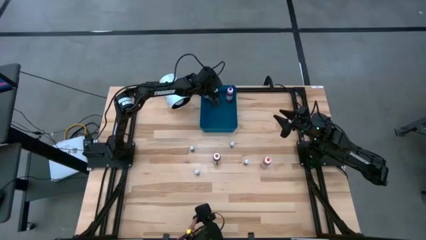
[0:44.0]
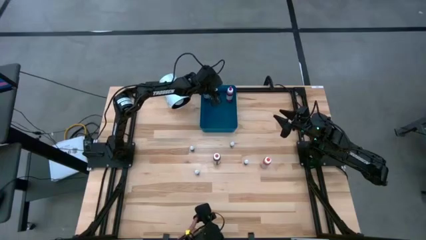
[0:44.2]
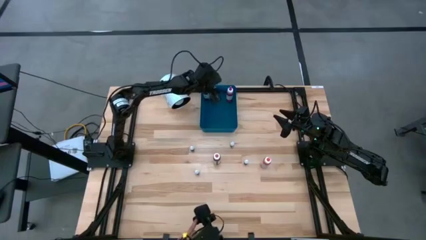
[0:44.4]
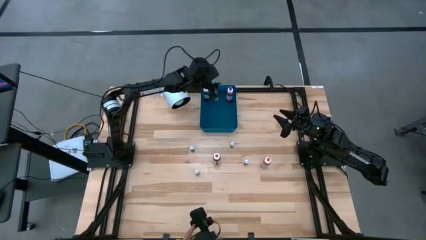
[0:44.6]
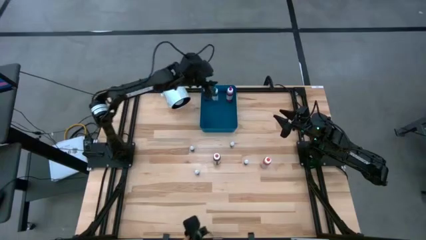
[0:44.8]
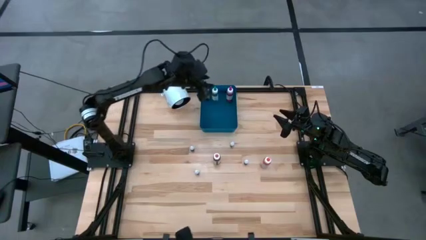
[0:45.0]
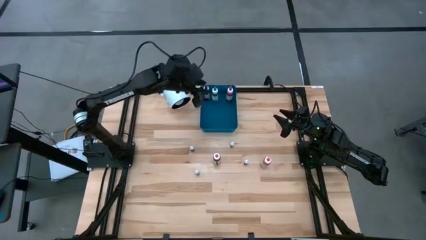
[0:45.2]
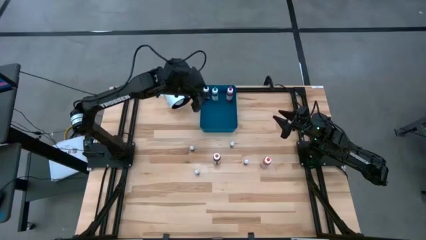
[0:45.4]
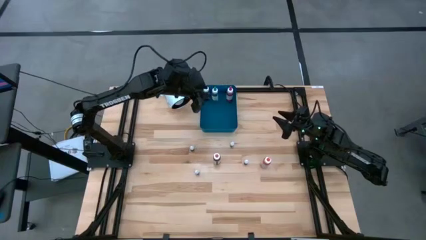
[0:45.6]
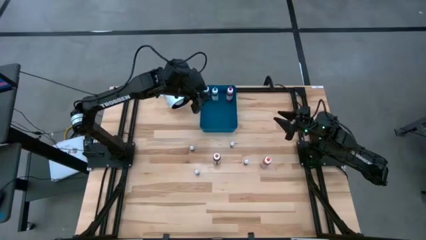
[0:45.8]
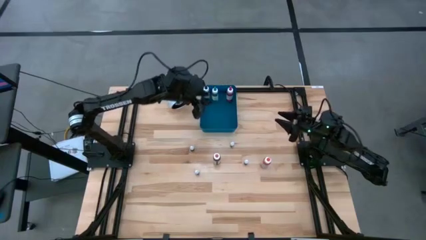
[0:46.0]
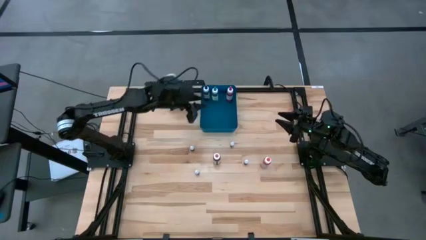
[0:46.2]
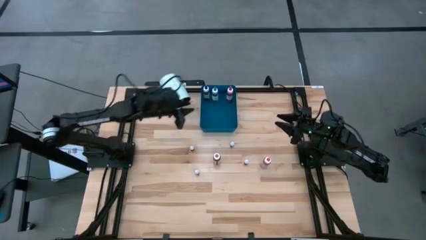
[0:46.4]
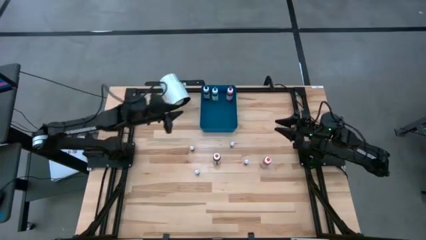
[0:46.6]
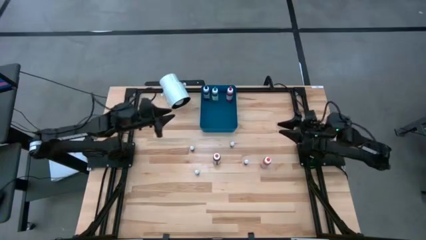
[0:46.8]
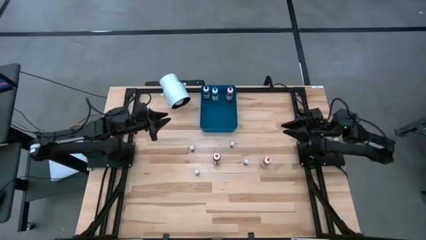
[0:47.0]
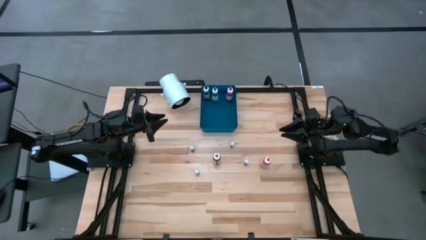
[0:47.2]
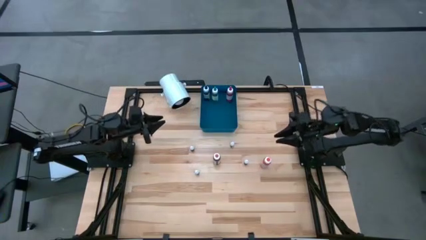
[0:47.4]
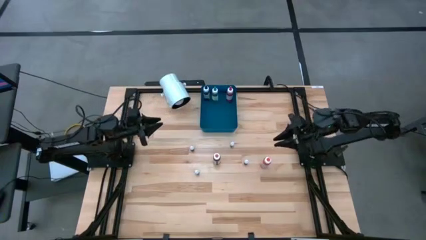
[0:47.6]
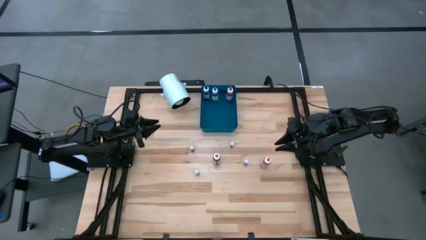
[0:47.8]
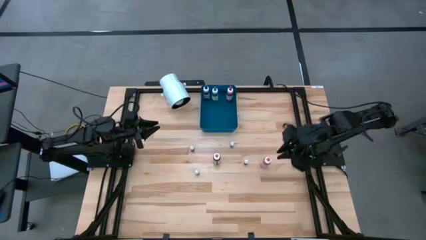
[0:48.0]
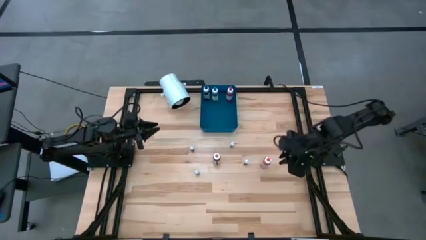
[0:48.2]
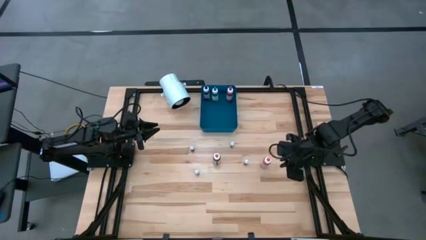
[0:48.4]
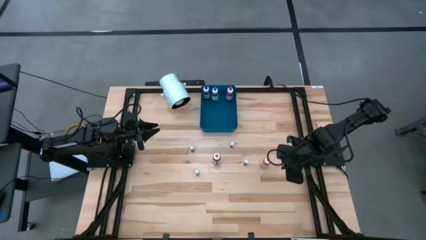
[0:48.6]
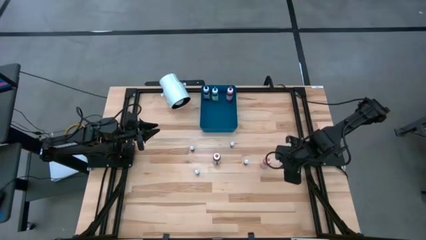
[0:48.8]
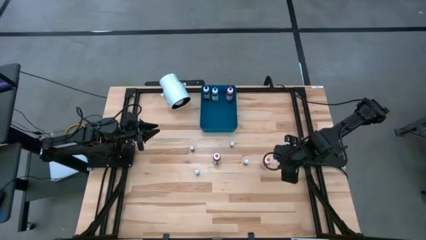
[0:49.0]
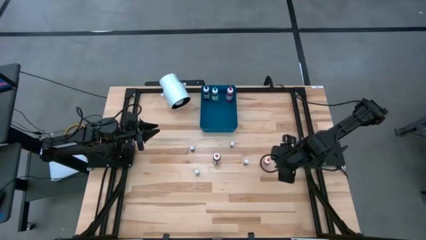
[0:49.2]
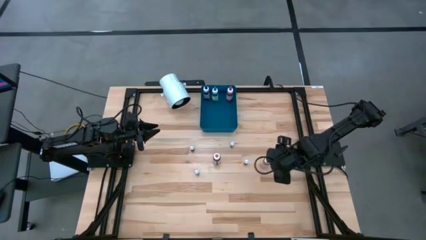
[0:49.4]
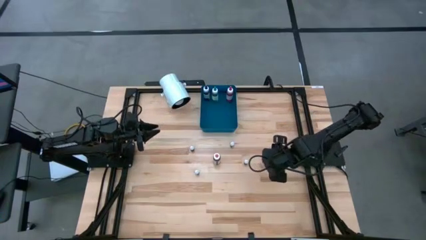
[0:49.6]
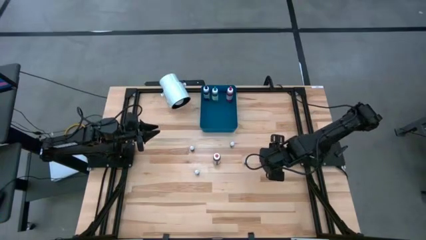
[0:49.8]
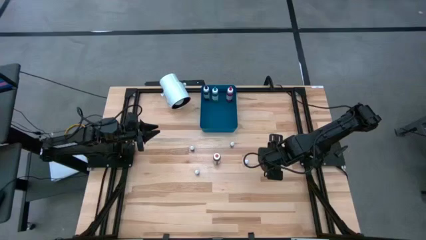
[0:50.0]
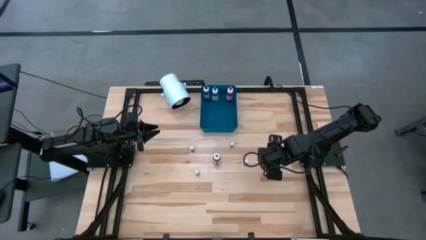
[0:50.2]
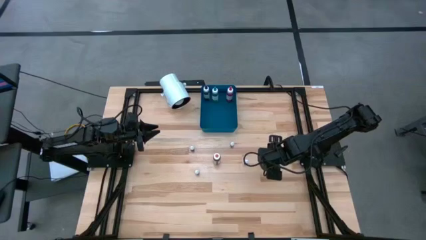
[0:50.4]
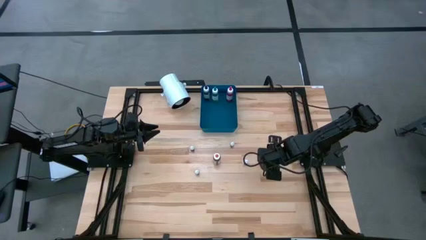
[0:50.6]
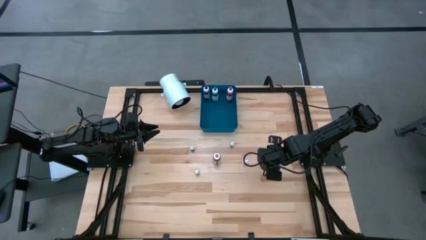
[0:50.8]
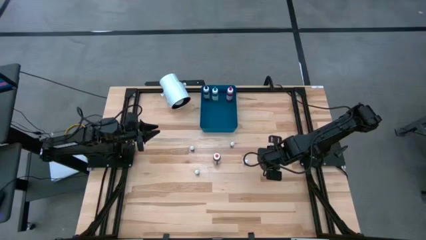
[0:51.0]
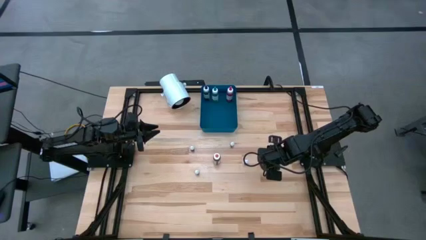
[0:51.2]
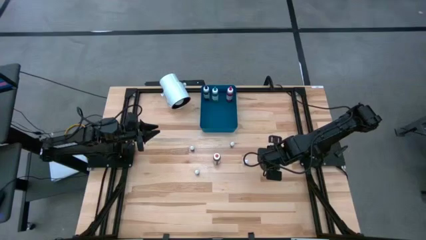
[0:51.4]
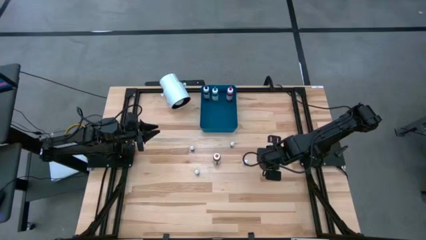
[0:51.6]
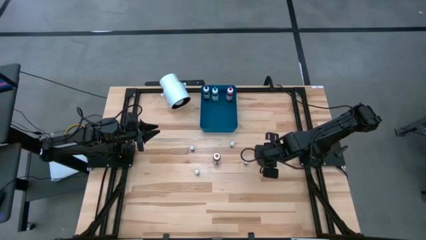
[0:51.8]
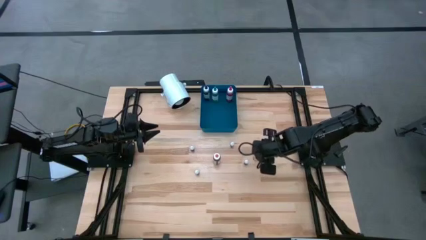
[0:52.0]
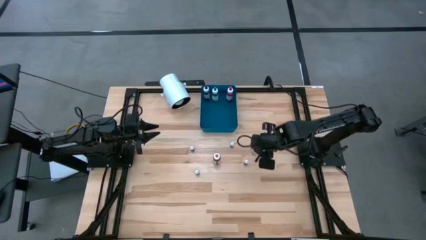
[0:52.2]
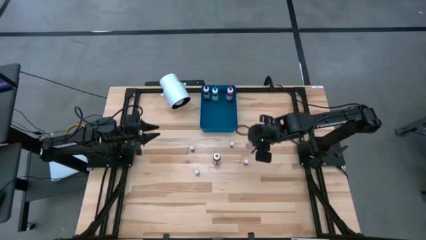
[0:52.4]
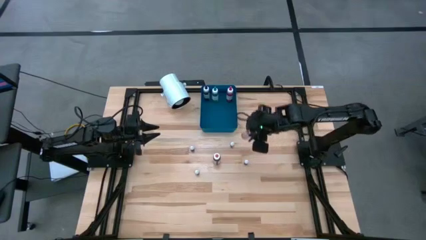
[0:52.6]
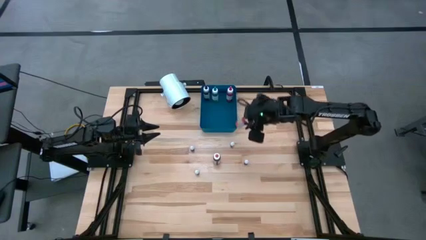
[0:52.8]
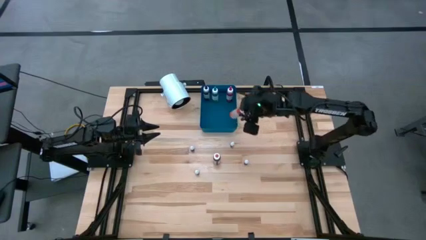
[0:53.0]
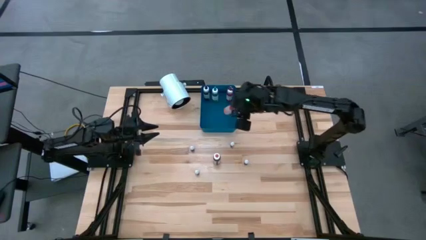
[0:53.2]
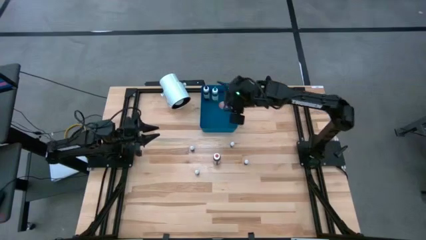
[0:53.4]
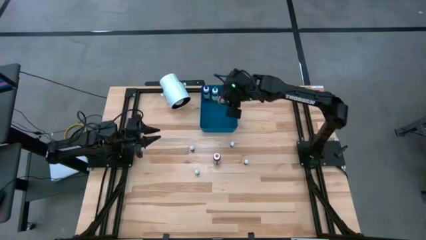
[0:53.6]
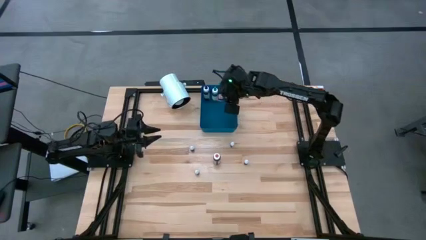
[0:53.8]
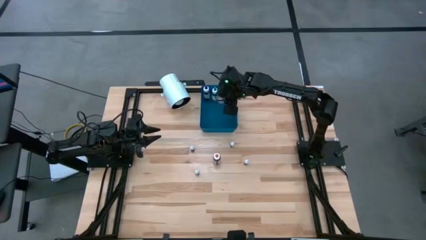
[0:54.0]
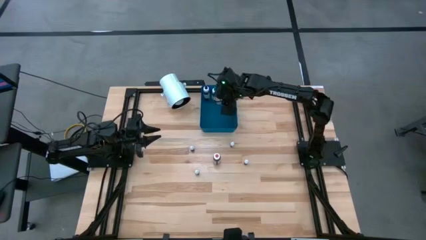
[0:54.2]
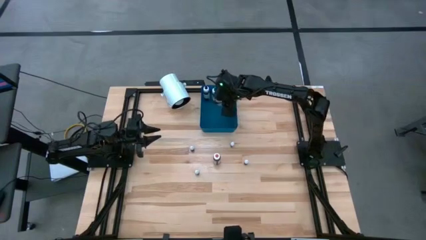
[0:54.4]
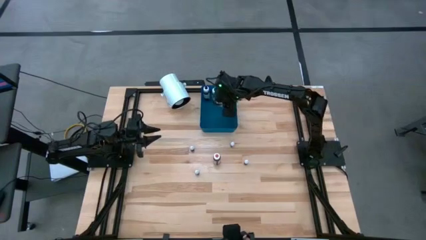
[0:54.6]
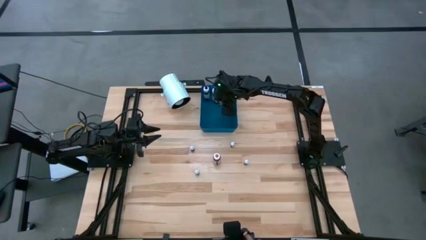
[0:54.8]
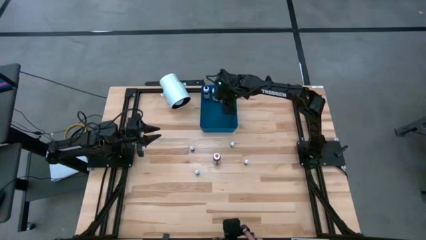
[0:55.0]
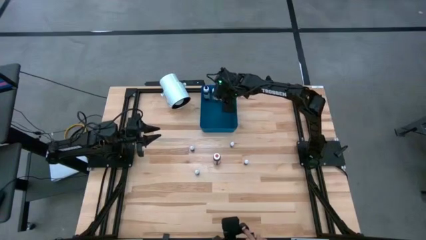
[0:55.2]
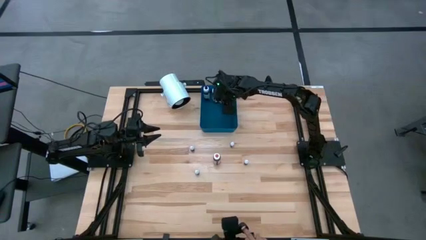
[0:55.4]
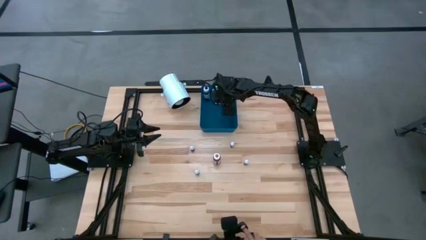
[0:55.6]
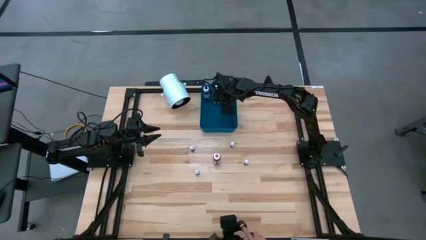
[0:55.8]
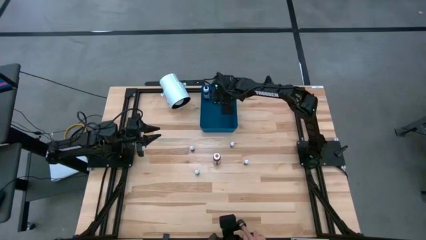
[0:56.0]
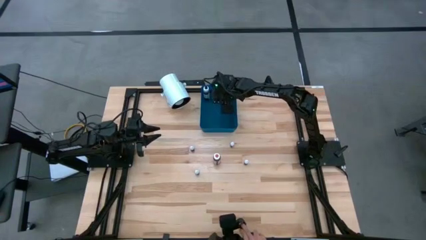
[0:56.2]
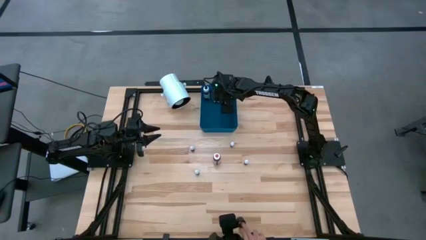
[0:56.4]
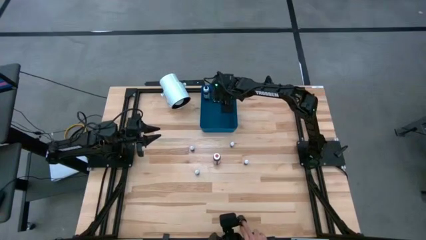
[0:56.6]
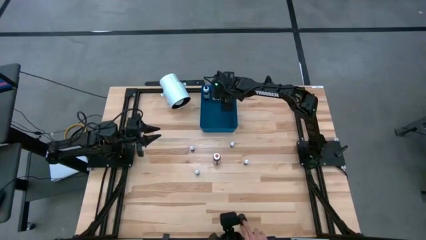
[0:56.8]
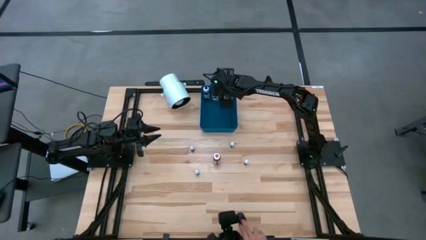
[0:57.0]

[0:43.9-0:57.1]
Task: Pick & Place food coloring
Put the large orange food coloring bottle into the blue bin

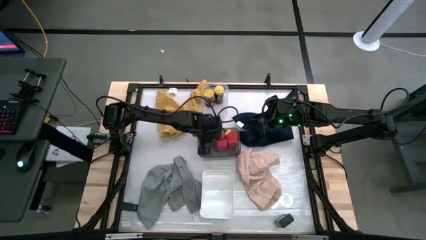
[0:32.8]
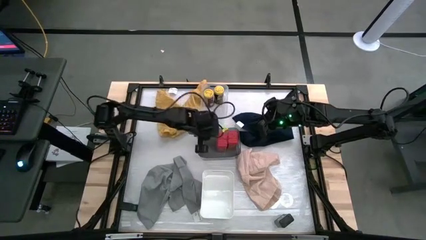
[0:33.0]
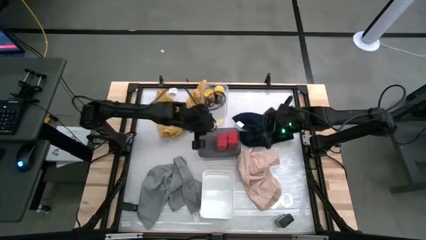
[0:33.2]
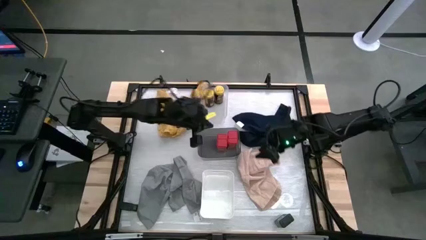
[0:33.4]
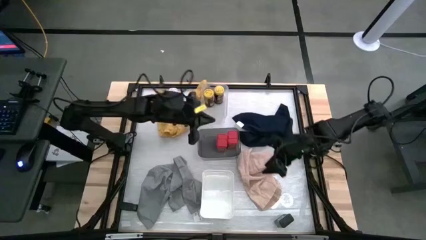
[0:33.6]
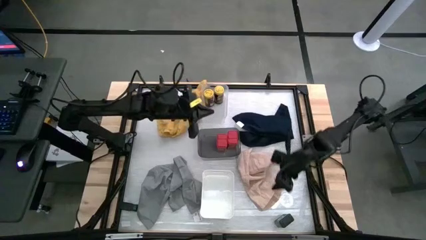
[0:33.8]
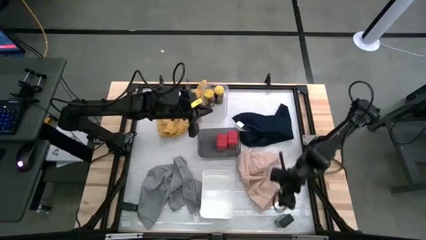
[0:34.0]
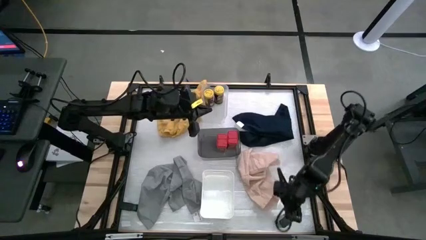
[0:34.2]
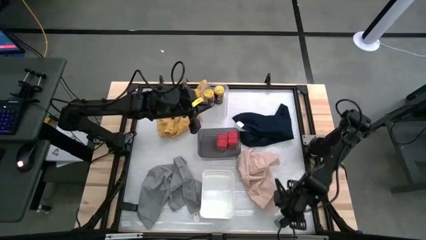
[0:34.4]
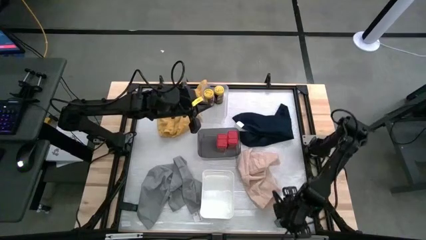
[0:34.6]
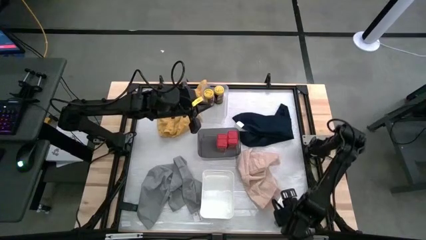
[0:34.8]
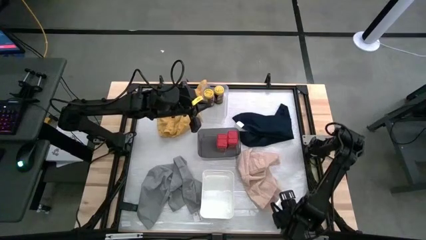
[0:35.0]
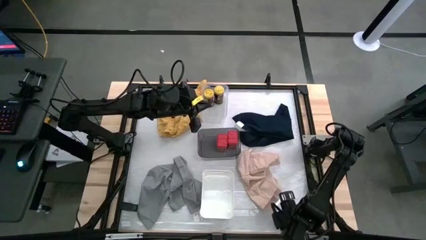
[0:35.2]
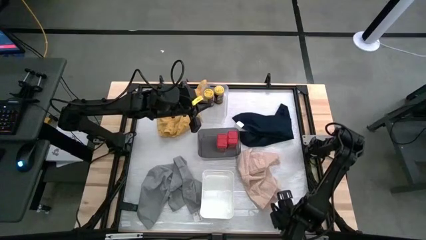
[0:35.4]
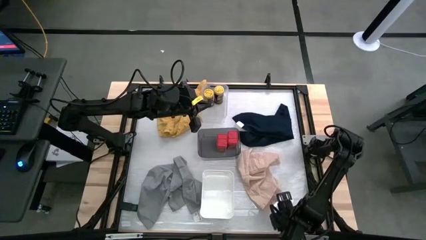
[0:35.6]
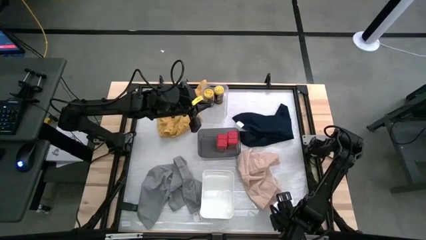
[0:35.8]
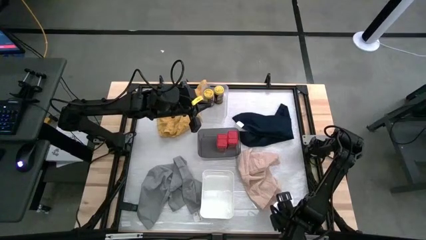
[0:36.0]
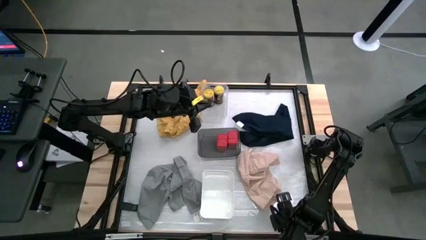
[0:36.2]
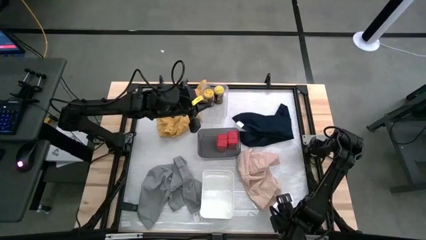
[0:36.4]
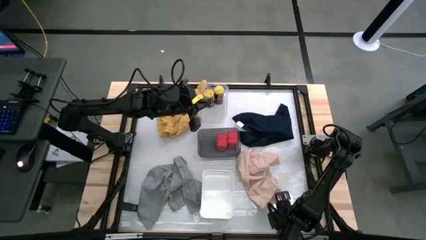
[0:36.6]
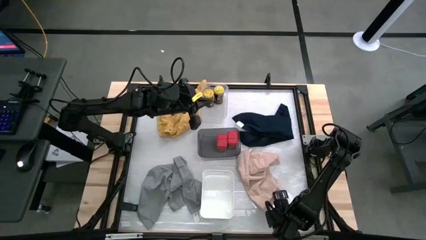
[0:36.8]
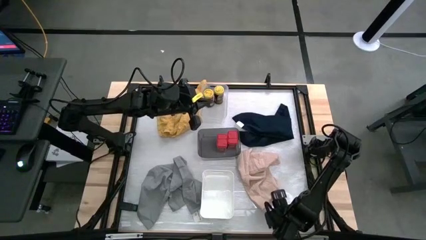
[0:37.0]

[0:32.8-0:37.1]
Task: Sort spices by type
Put the right black spice can into the white bin
